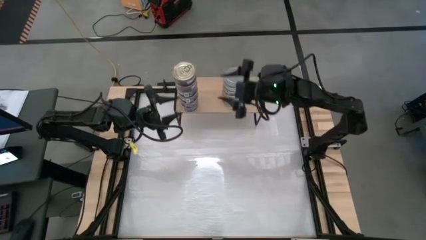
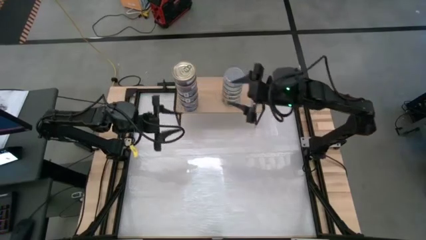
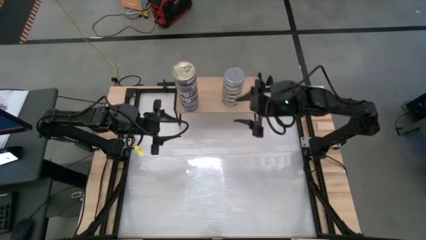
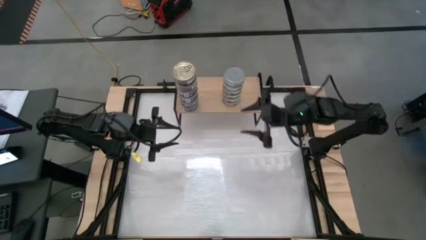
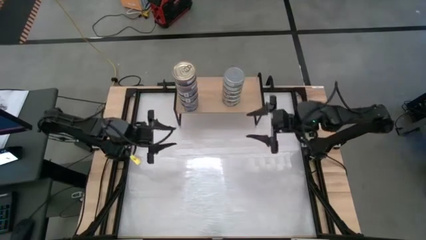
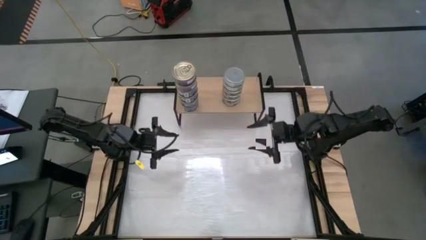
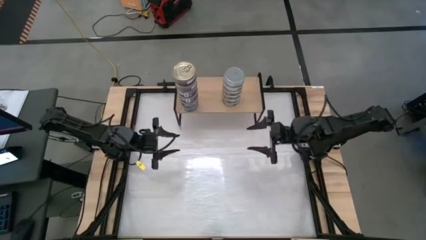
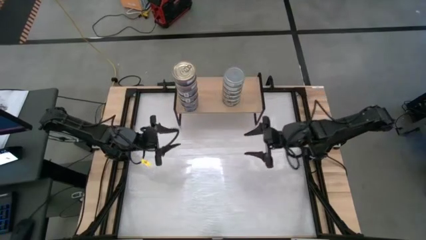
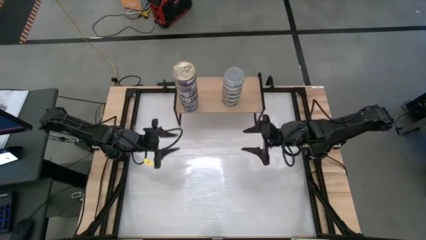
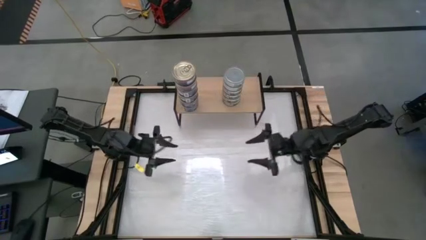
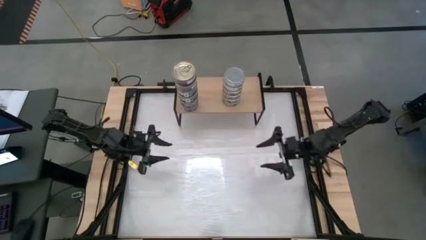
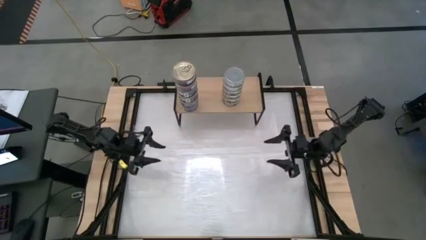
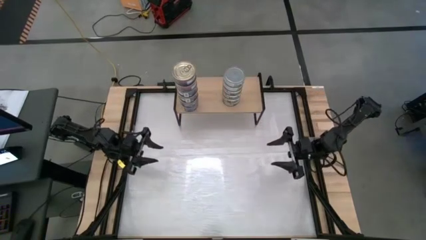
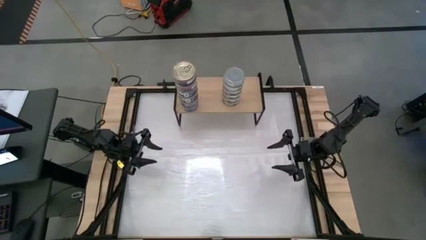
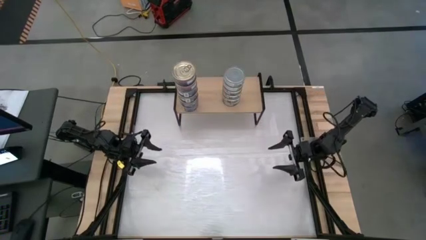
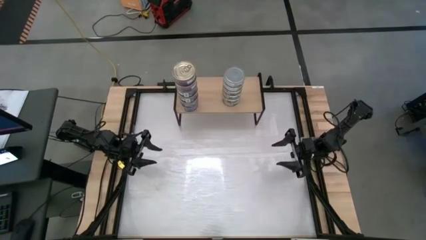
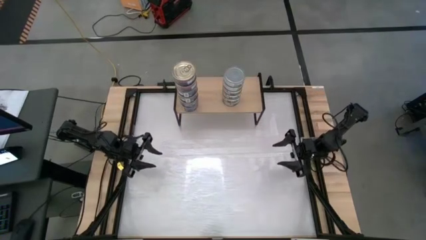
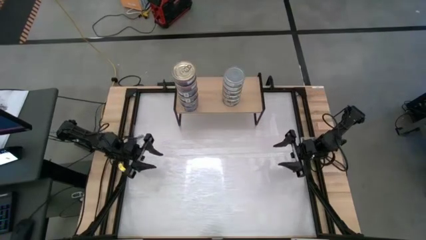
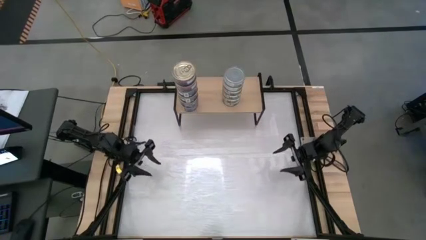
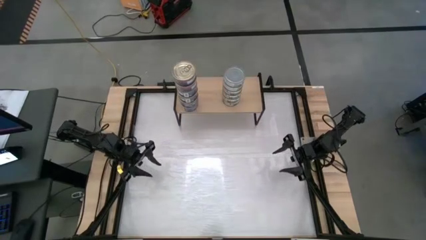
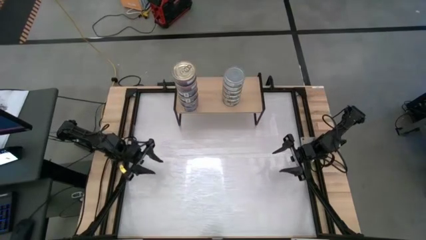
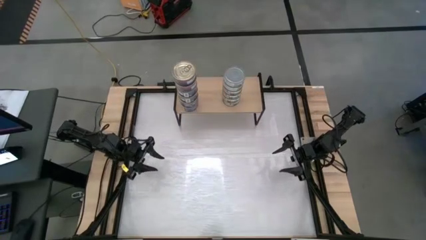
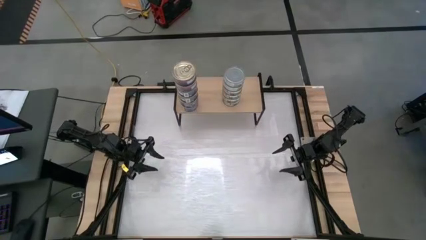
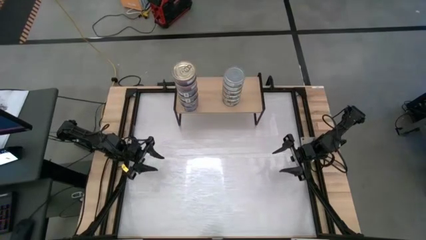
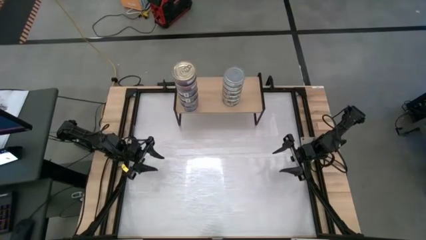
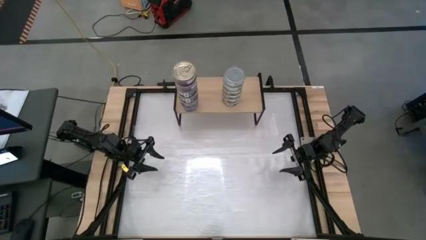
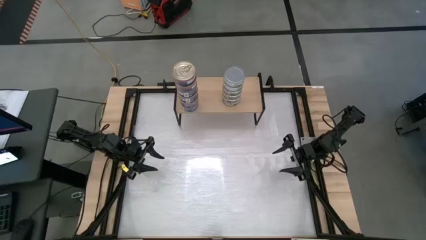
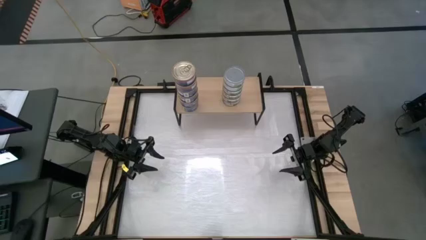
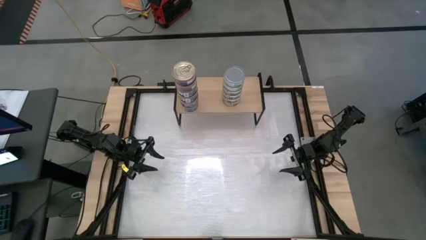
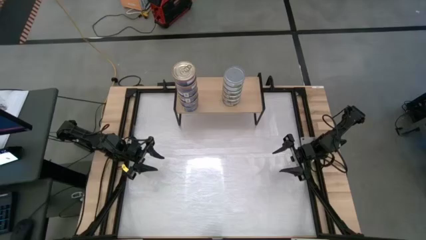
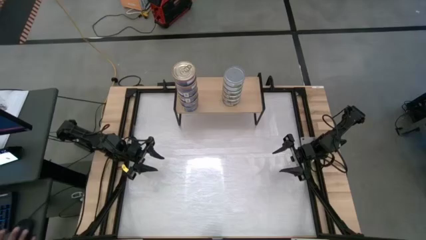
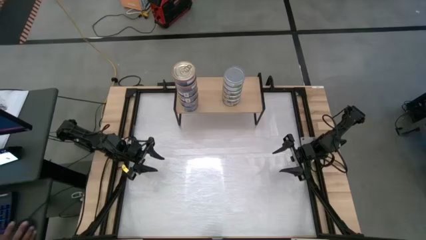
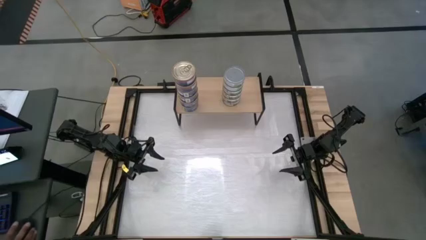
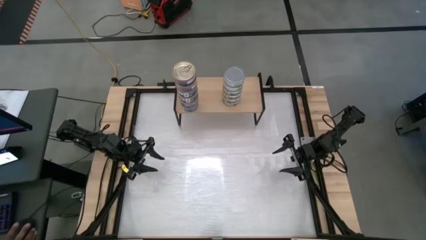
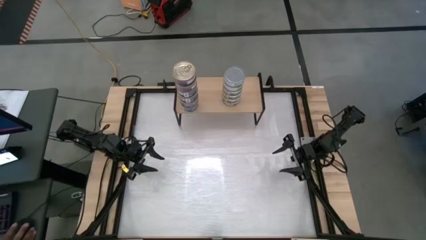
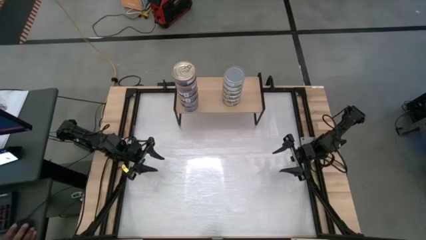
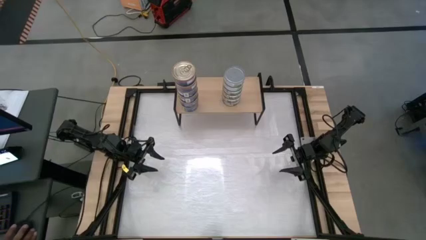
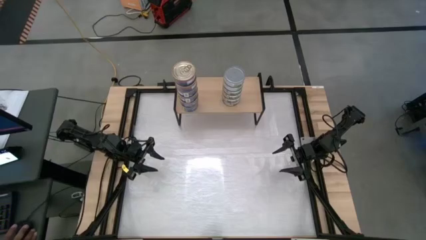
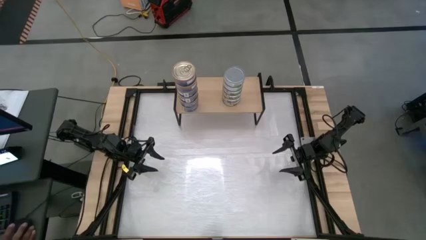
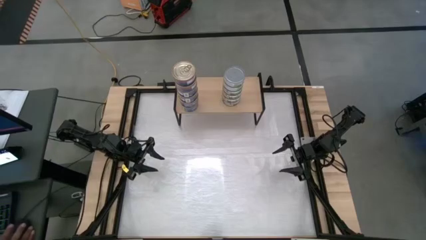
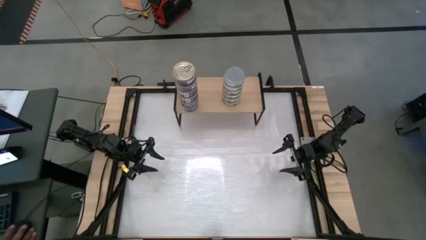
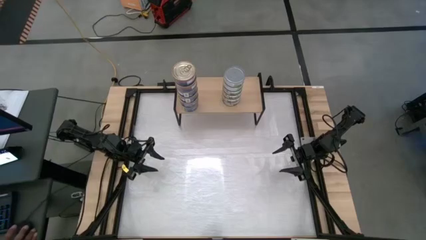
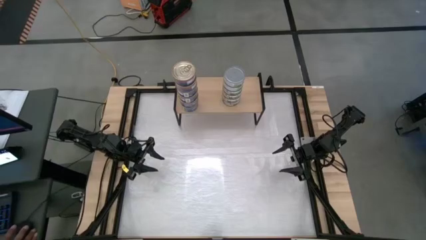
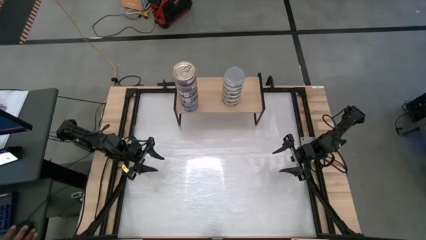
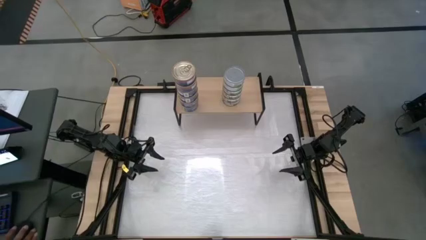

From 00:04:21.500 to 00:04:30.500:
Task: Stack canned seafood by type on shelf
Return to Home Position

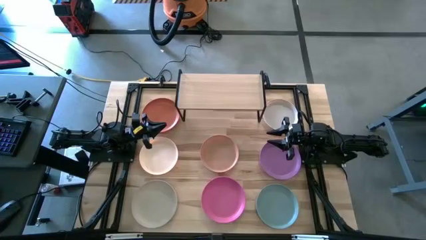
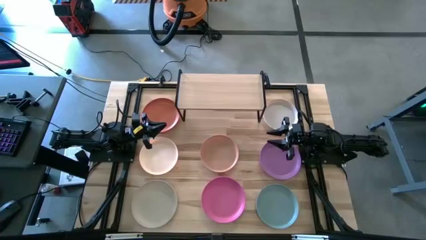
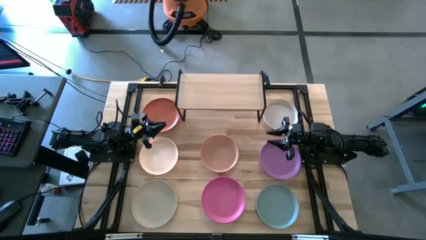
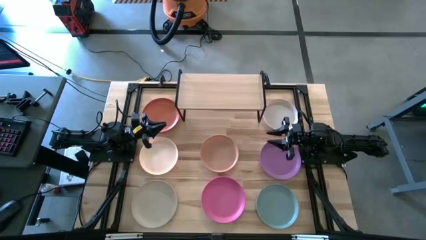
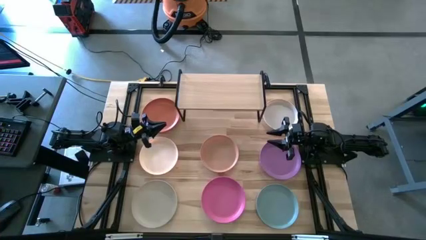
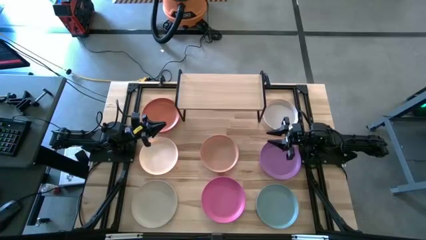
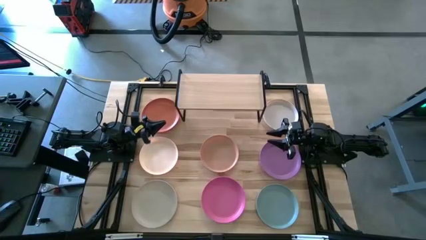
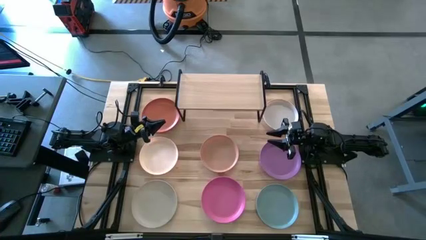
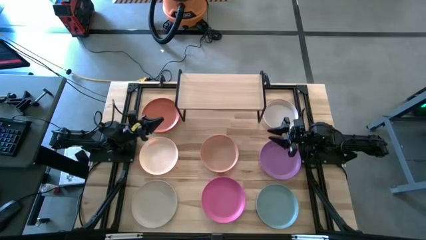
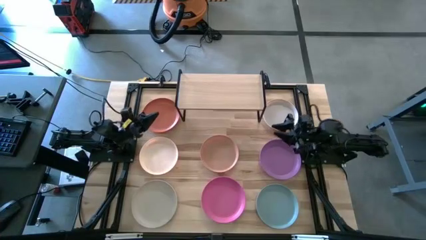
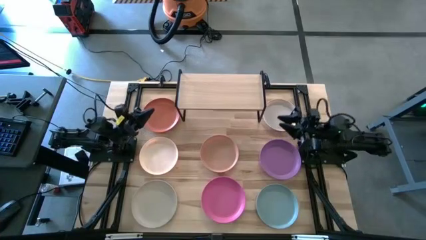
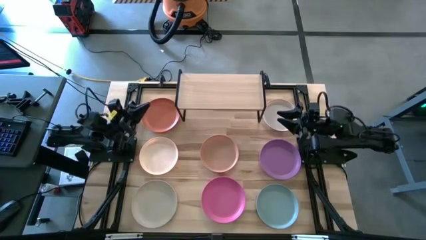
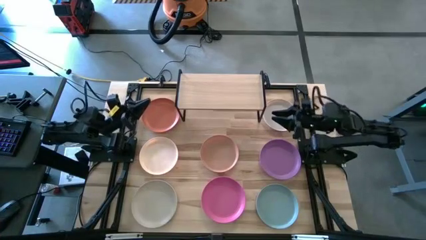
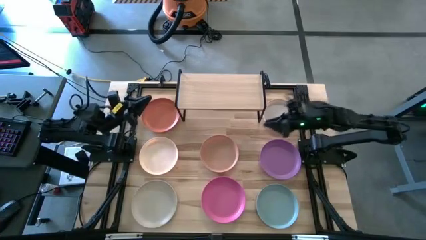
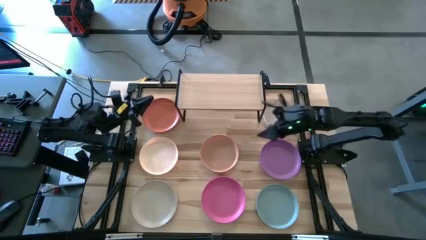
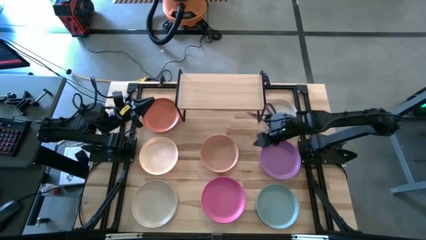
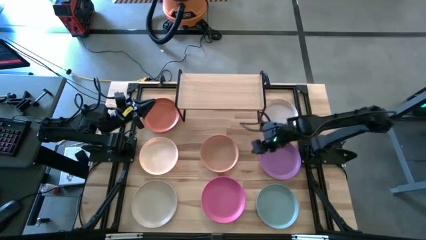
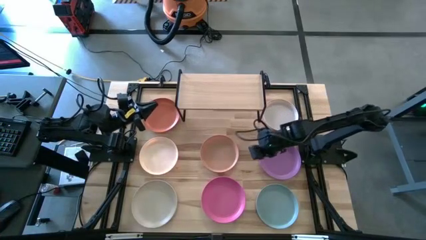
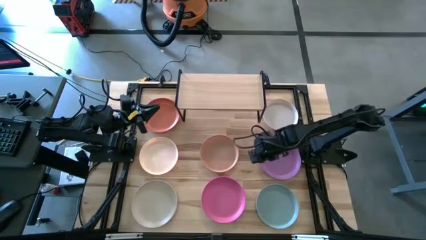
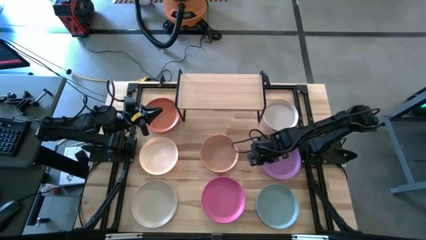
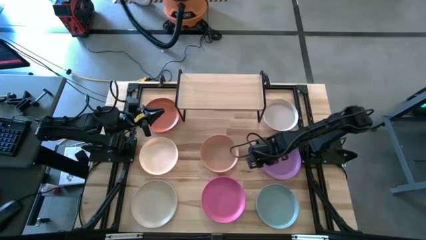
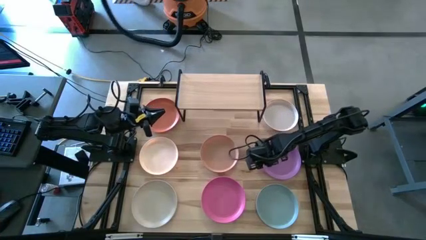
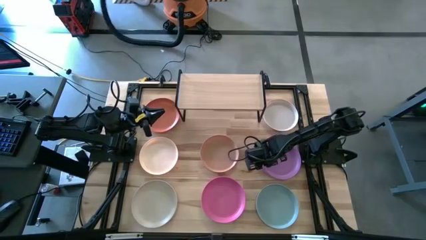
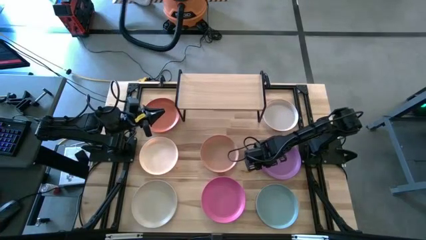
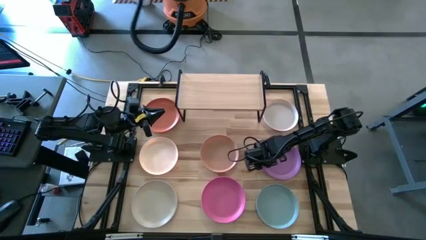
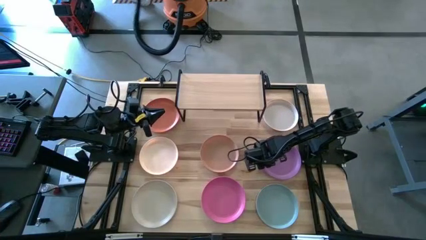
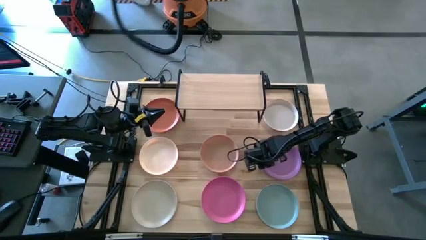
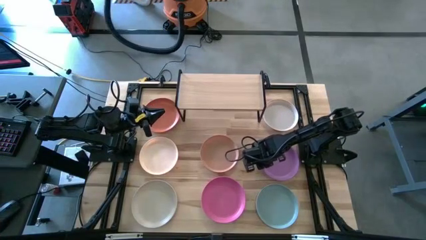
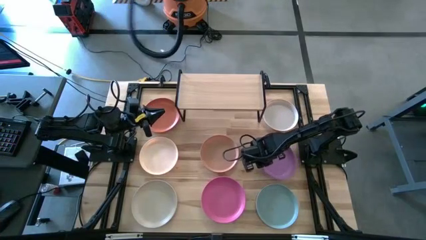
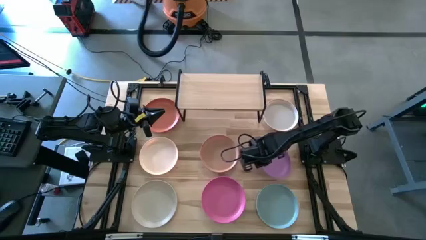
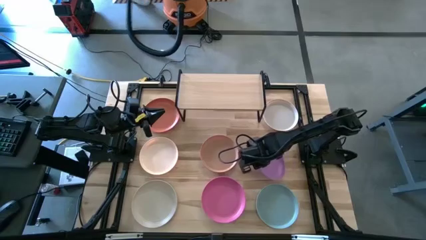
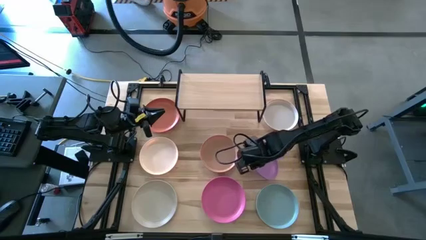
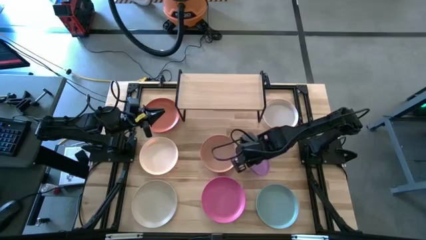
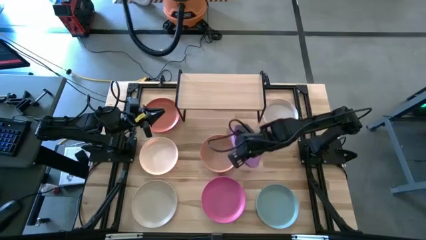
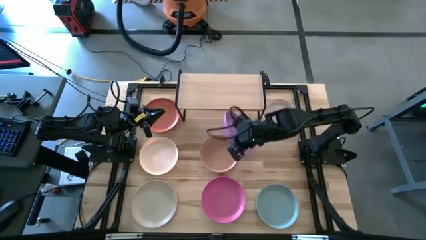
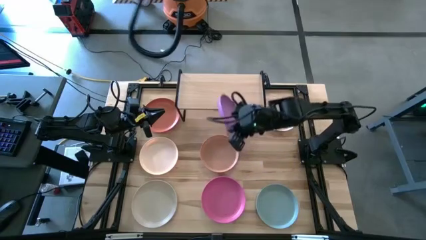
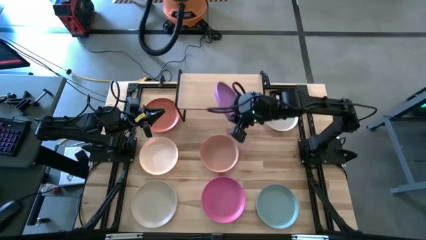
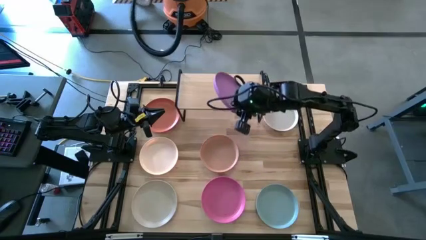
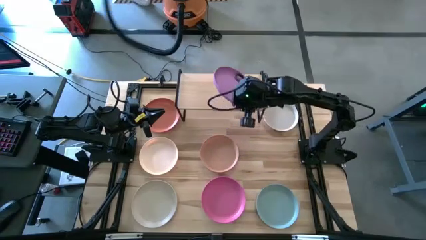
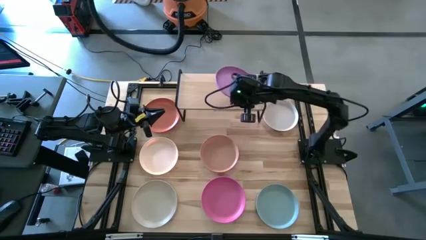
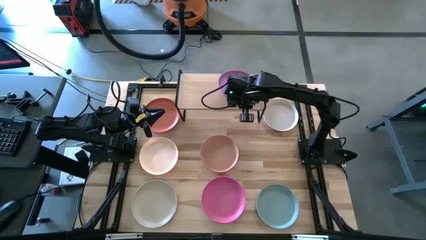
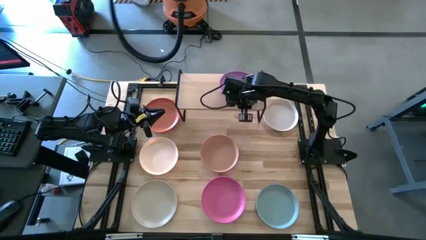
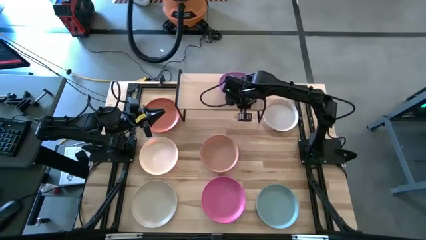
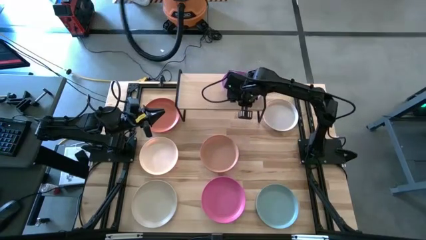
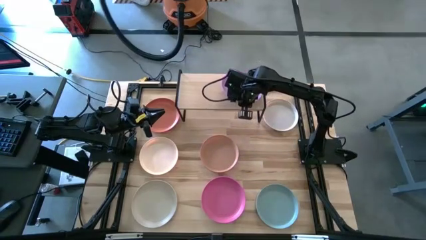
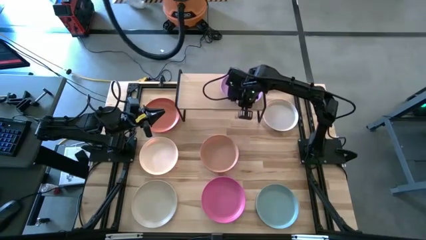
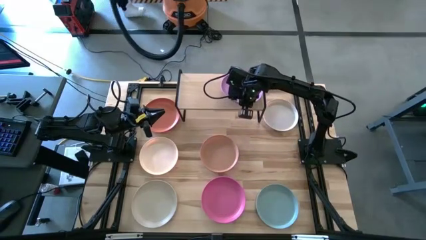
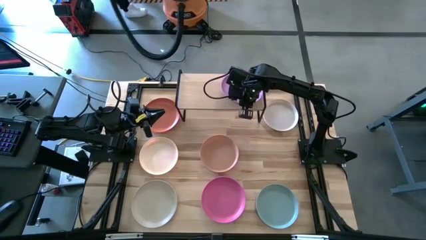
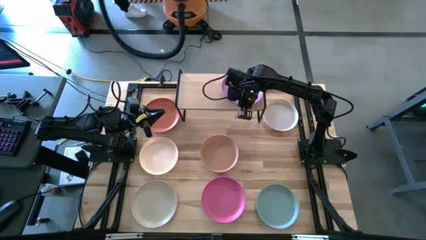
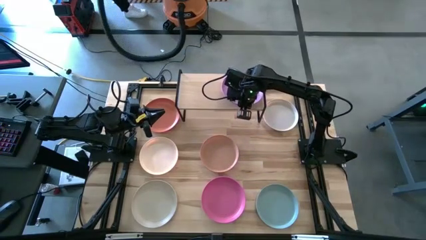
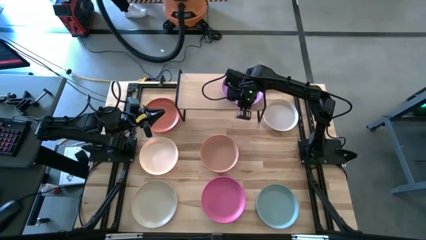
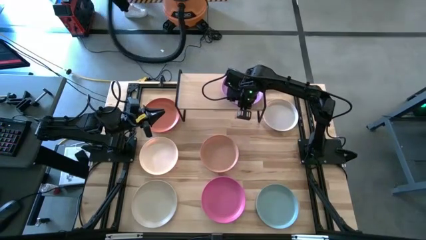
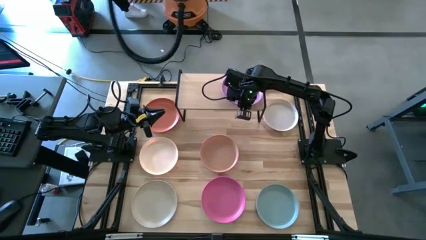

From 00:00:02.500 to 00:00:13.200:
Task: Place and stack plates onto a shelf
Put the violet plate on the shelf
